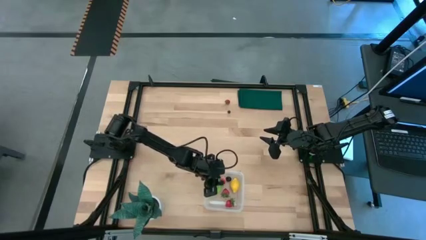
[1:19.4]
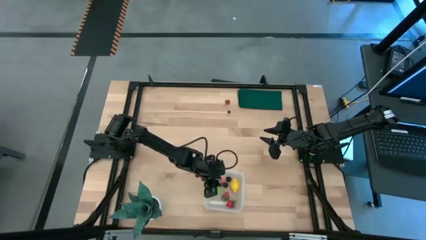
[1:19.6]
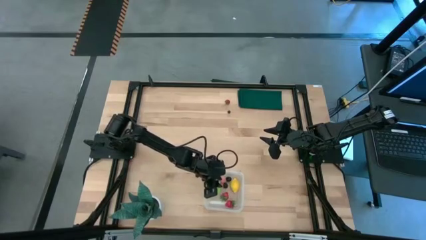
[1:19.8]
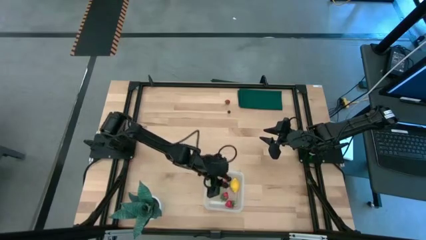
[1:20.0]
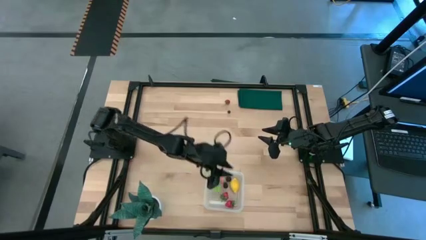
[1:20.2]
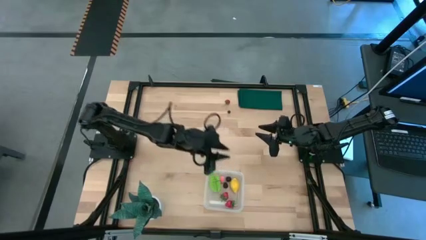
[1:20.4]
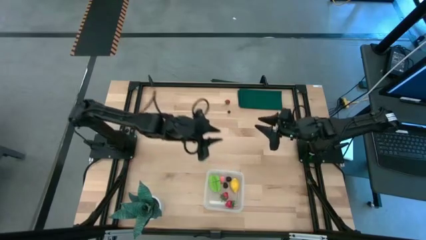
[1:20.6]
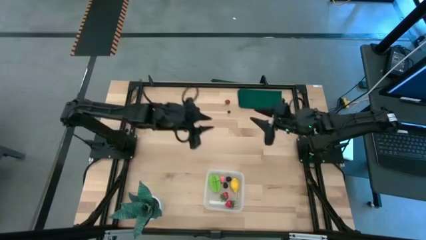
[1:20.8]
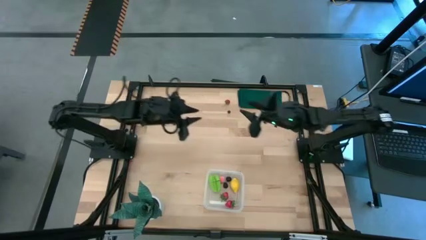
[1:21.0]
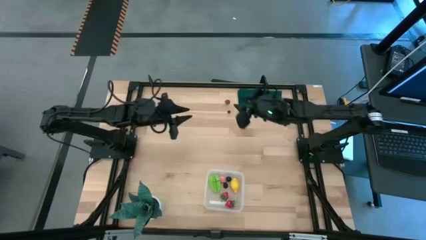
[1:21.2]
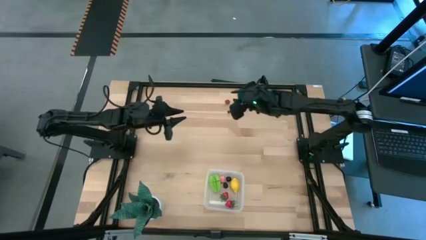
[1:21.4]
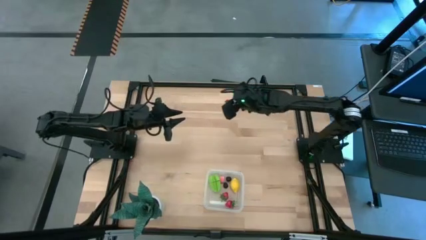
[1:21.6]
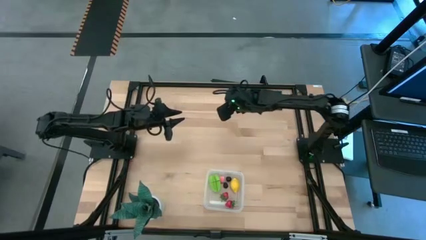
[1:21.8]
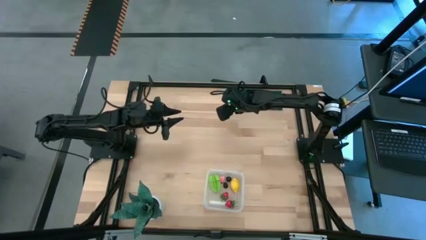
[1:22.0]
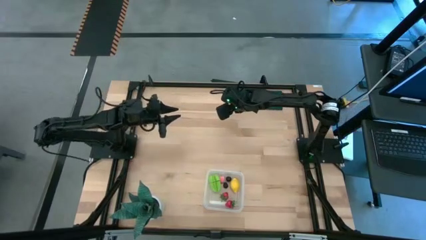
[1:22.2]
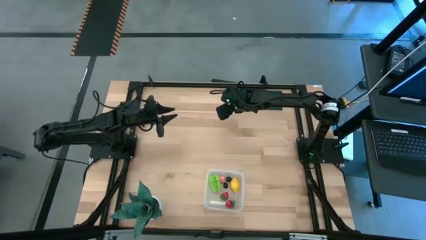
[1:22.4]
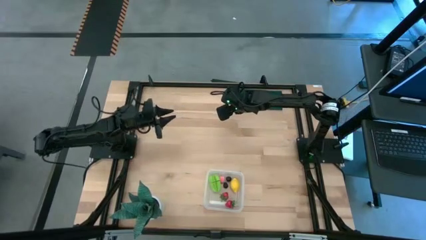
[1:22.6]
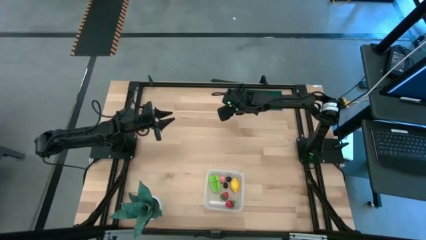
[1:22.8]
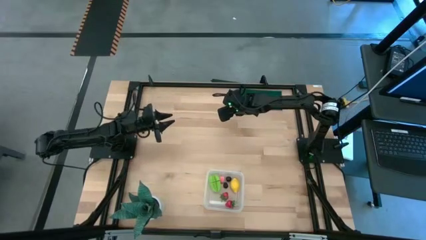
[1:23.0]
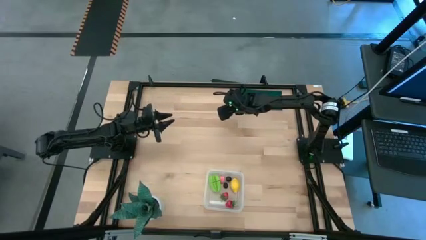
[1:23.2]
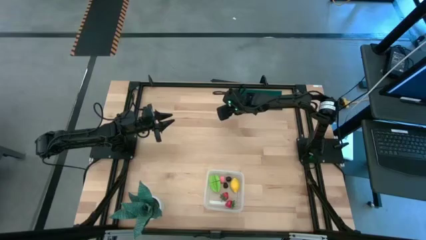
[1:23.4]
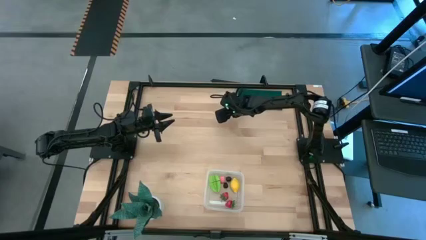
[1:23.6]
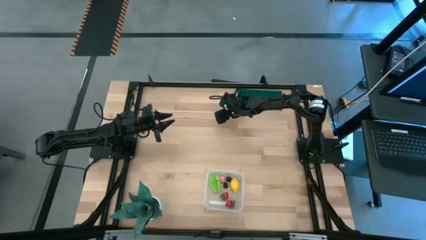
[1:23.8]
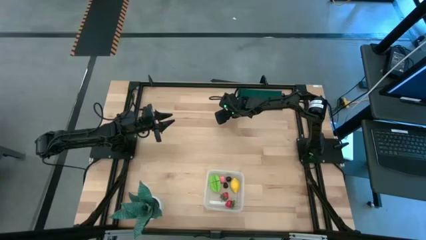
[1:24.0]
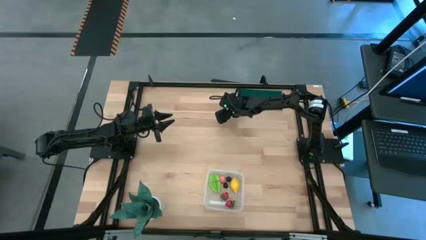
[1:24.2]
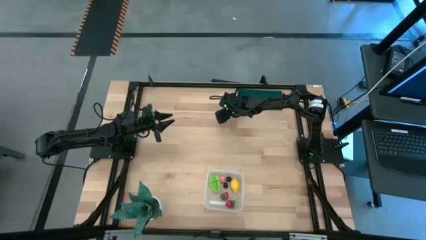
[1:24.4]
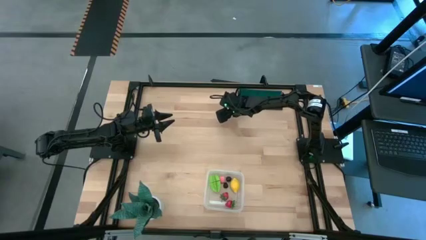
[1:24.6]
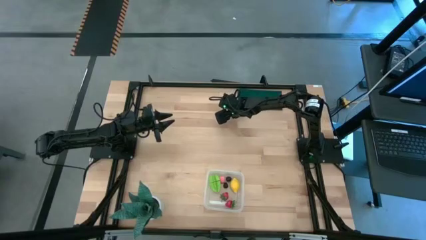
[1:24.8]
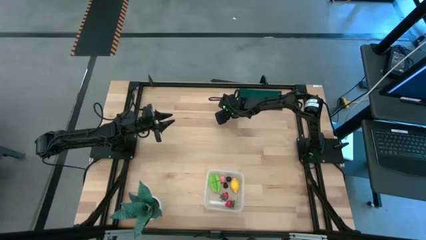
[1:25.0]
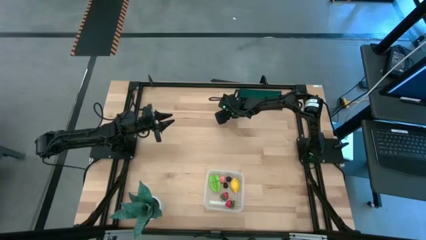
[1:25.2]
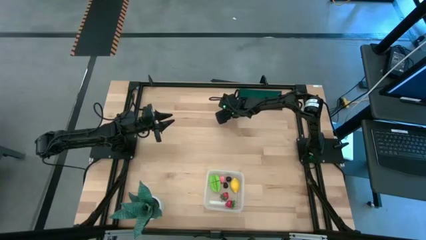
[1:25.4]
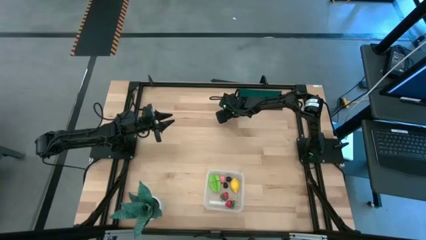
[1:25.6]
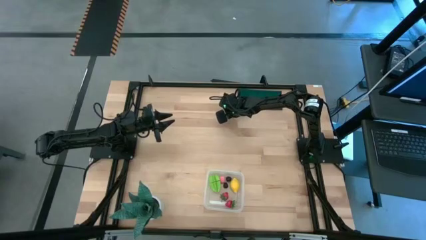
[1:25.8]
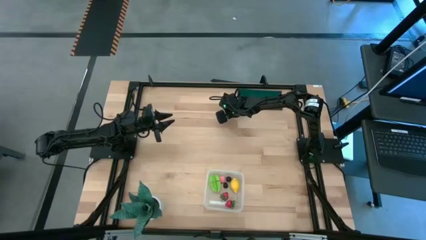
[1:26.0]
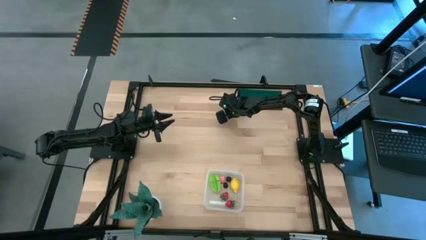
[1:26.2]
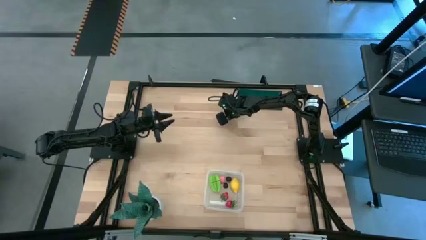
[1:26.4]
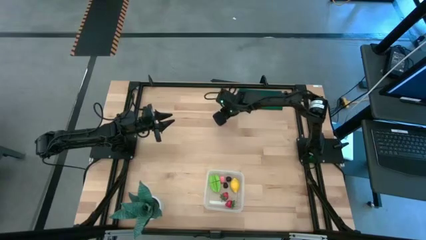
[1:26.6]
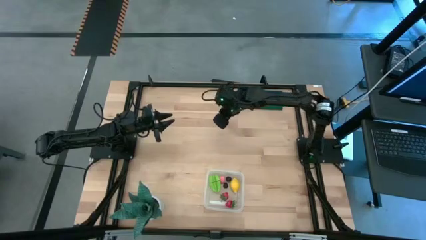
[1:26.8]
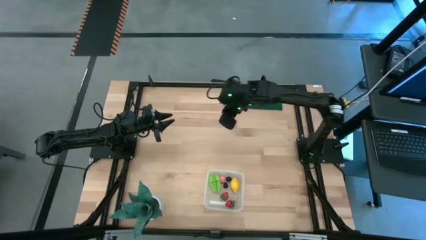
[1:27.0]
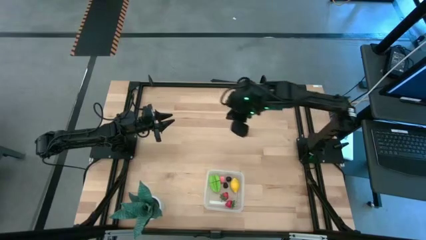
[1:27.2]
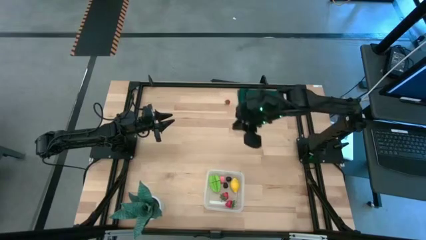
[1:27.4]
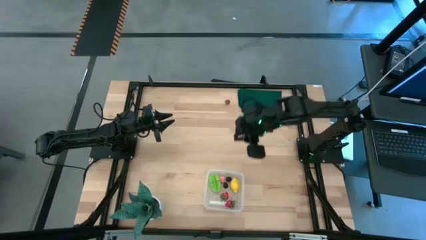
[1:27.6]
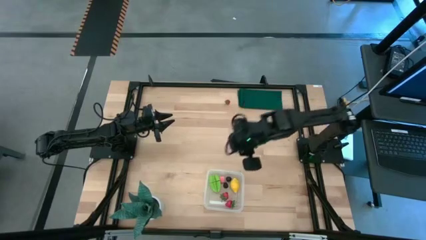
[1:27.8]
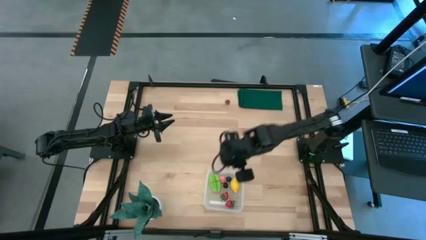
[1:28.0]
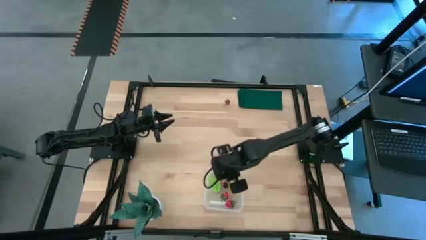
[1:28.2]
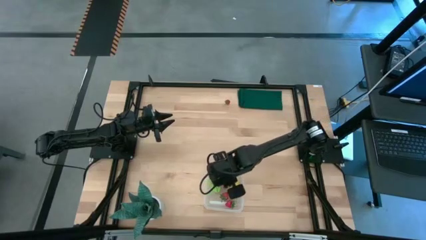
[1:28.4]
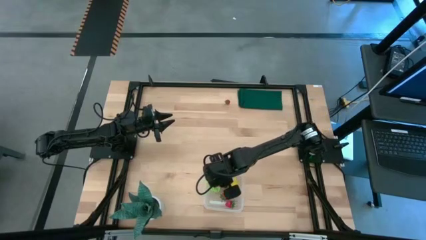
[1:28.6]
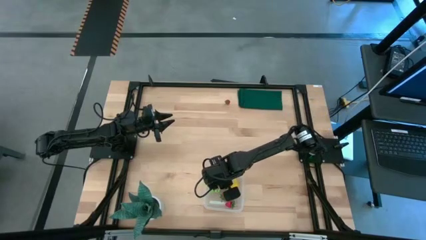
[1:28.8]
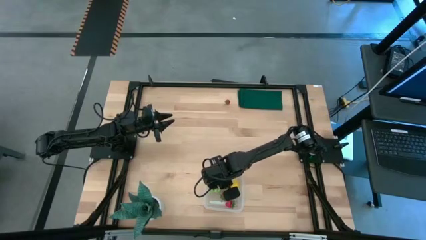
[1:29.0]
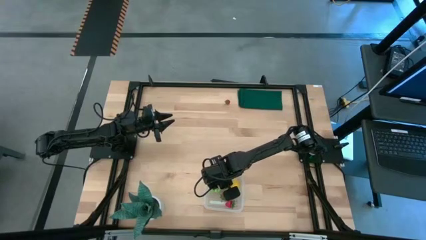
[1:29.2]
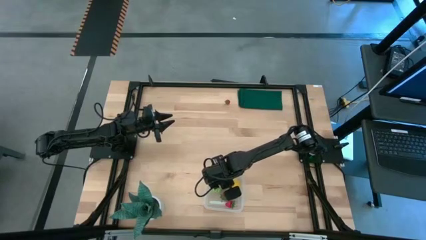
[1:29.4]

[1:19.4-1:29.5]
Task: Pick and placing Produce into tupperware
Put the blueberry into the transparent bin

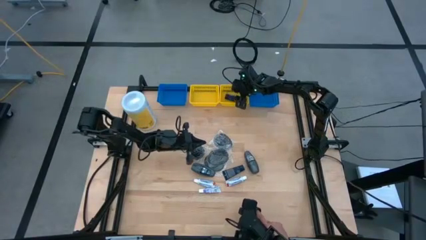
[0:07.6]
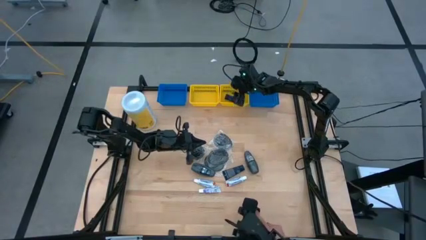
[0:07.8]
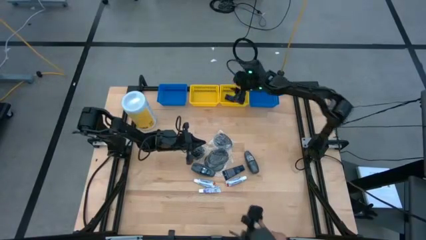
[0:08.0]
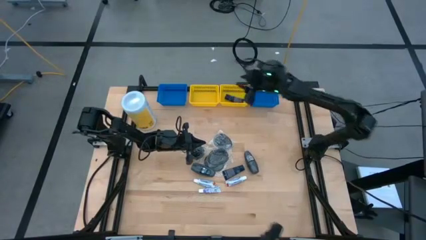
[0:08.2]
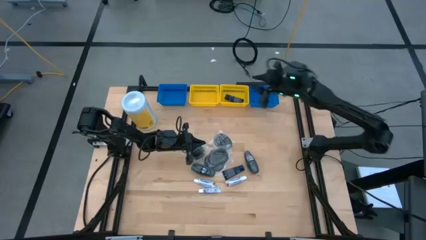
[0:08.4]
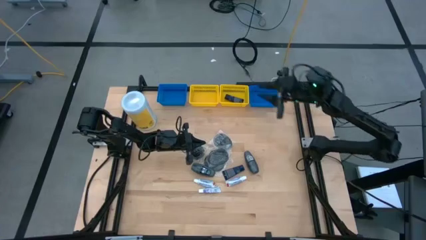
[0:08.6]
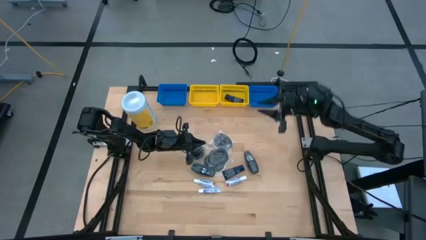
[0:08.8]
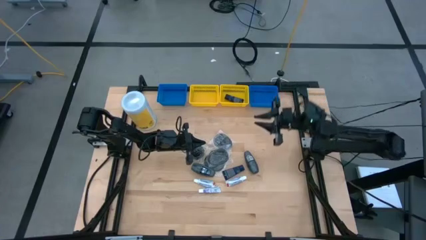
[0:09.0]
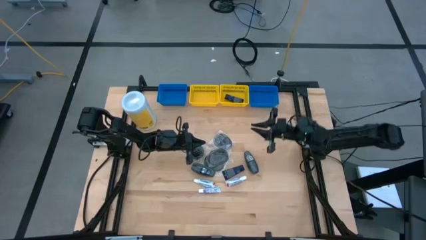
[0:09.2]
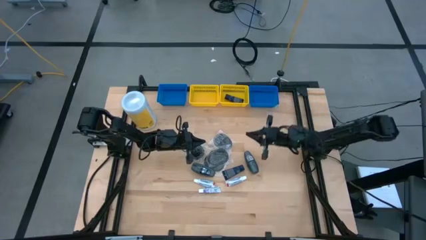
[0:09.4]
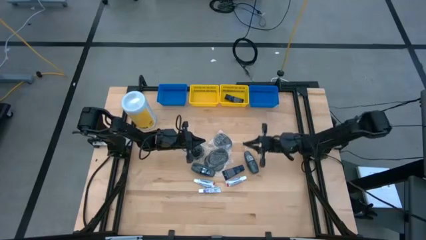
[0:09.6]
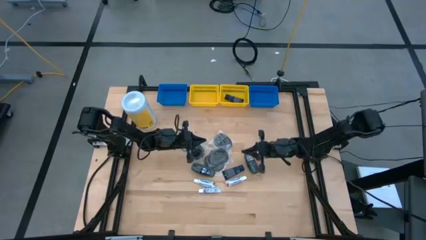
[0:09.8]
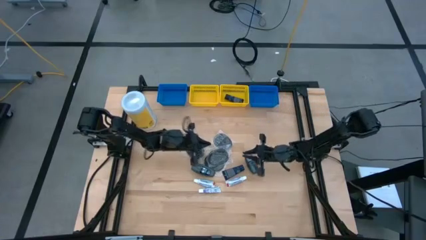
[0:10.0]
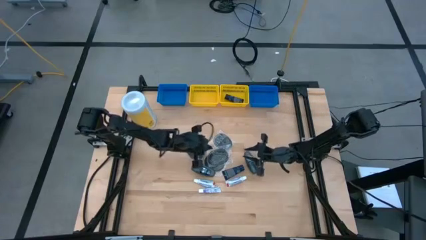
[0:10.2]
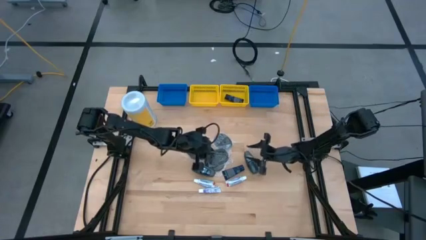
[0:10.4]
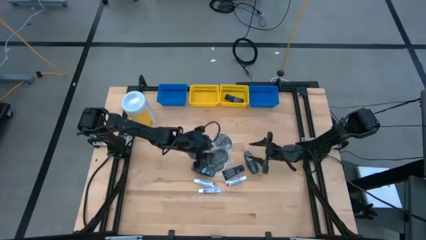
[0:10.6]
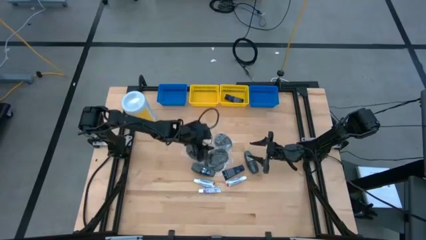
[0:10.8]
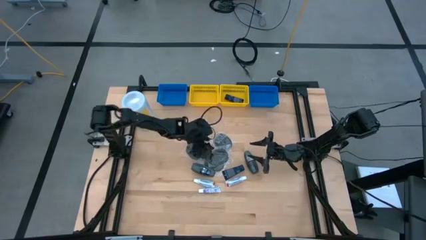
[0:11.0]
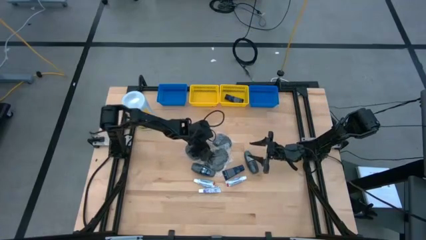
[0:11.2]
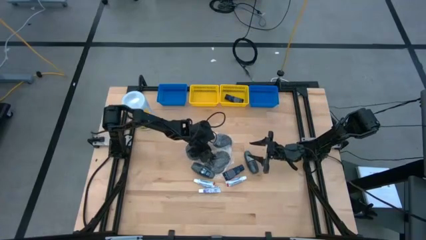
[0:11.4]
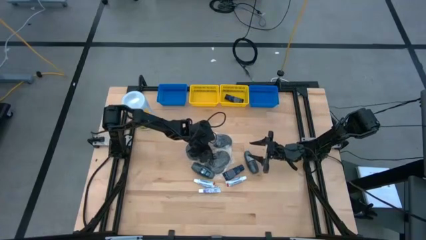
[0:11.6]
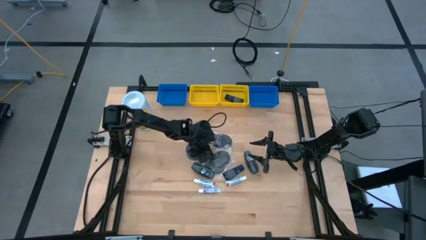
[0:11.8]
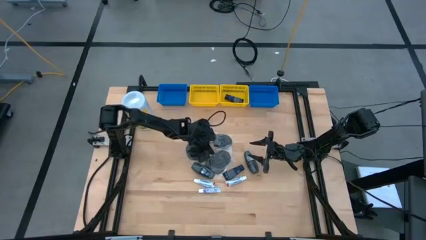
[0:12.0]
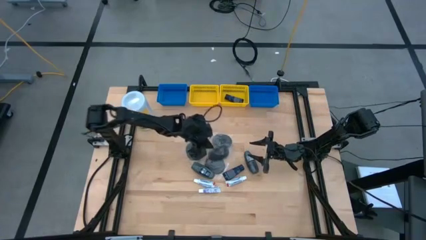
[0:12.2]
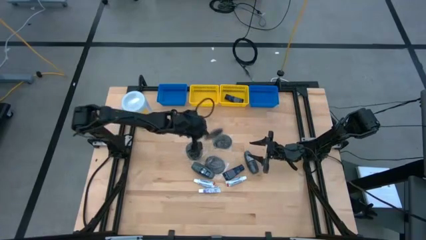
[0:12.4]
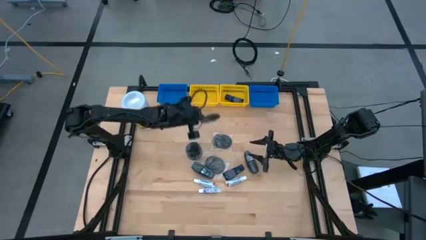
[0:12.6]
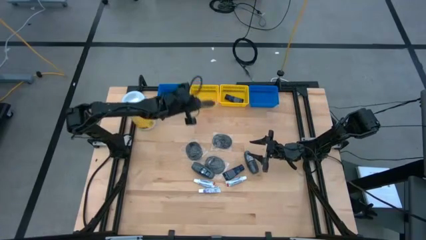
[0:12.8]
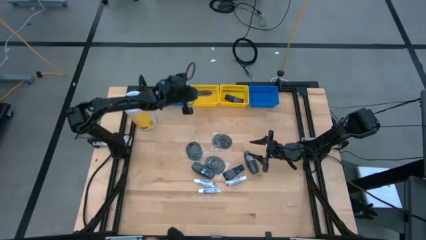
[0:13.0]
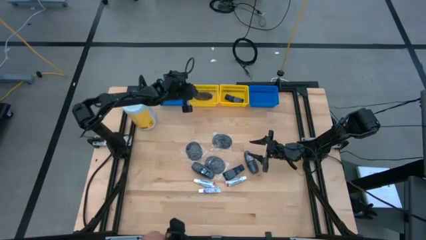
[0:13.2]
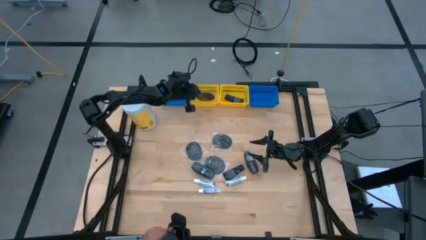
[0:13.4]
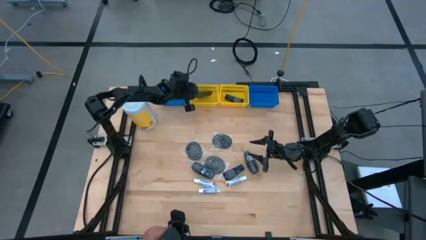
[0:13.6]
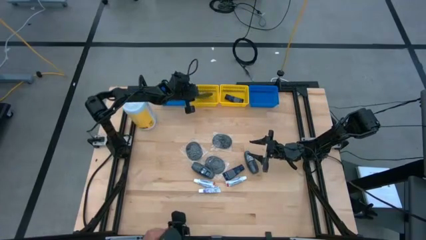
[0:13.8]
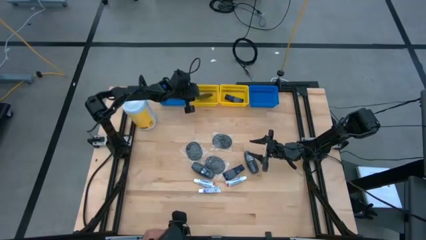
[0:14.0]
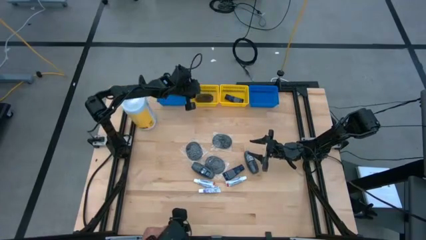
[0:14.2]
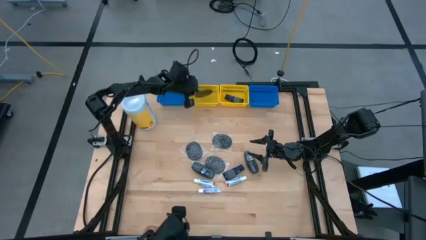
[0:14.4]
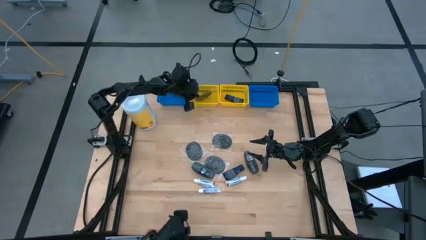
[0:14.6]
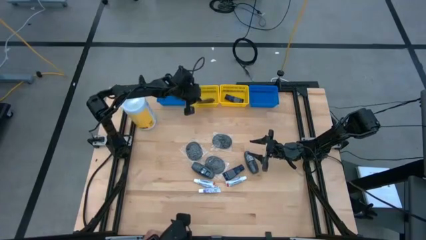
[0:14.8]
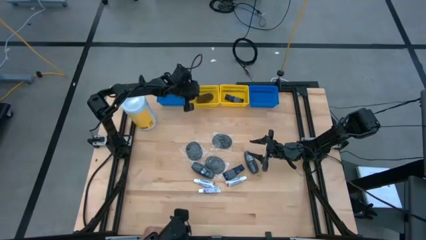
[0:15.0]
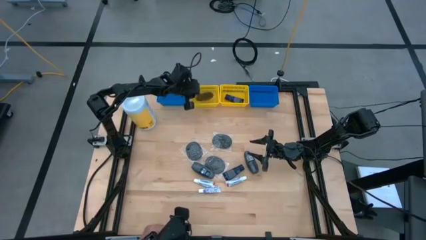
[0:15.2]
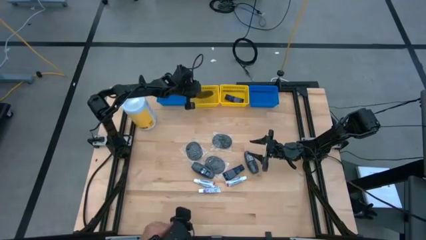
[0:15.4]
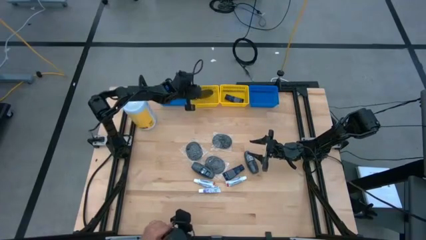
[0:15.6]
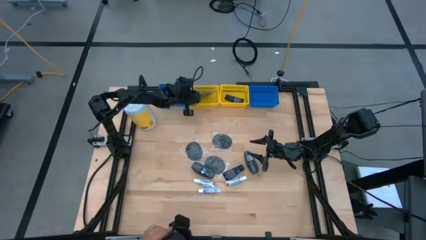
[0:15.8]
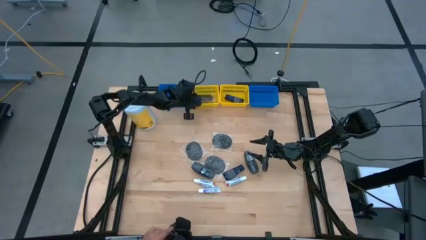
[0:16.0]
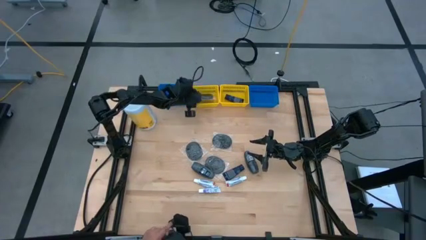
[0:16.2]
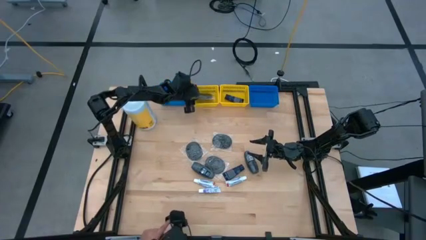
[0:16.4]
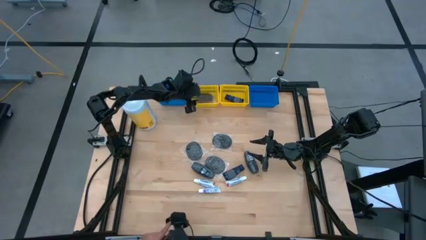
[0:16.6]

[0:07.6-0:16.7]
Task: Pick & Place Travel size toiletries
Put the hairbrush into the left yellow bin
